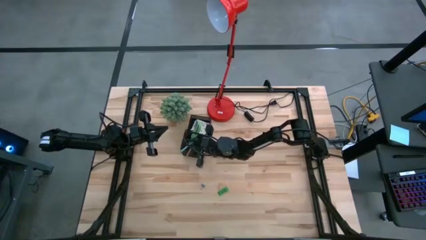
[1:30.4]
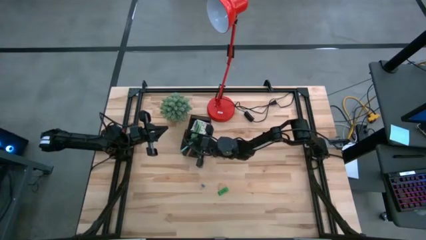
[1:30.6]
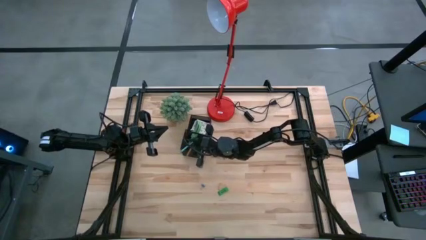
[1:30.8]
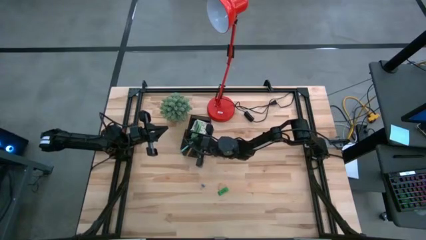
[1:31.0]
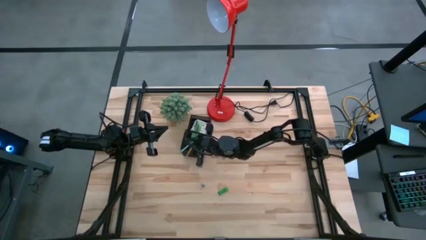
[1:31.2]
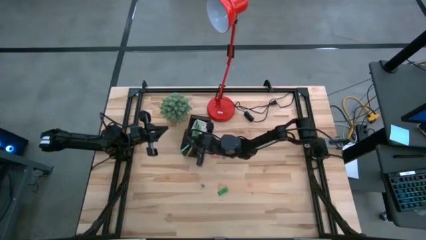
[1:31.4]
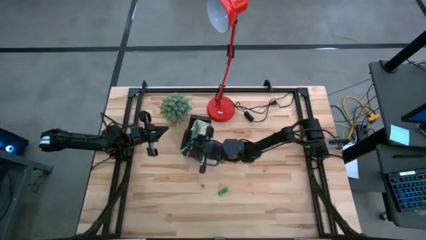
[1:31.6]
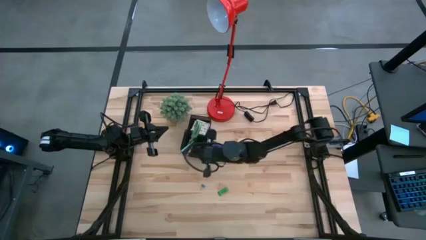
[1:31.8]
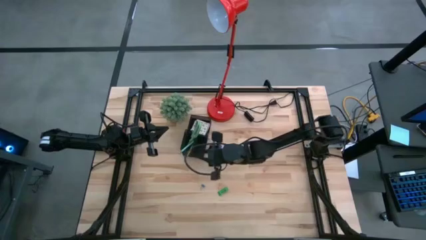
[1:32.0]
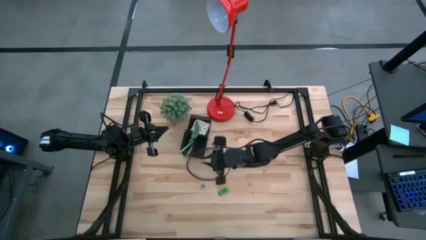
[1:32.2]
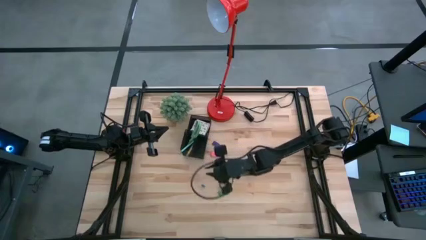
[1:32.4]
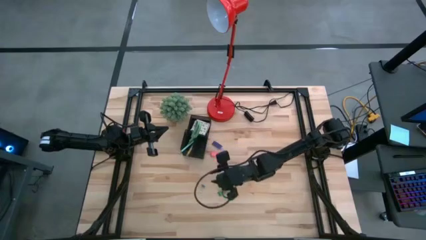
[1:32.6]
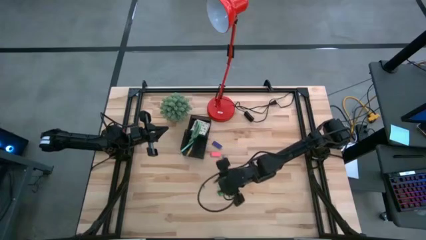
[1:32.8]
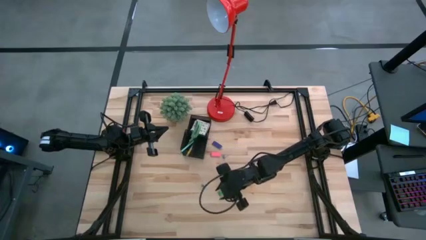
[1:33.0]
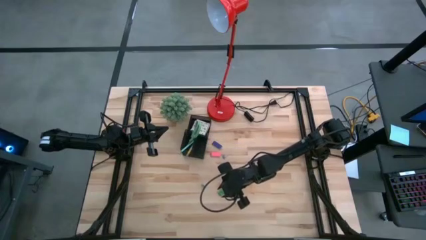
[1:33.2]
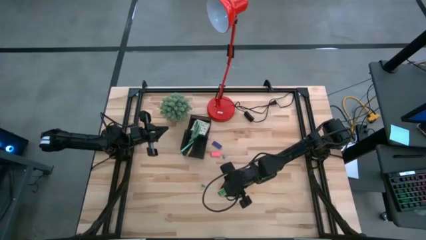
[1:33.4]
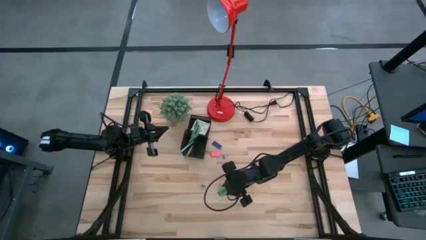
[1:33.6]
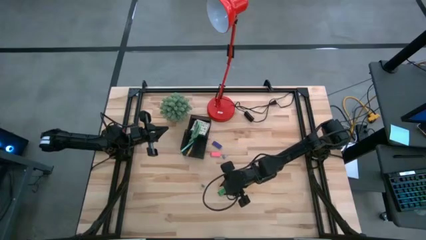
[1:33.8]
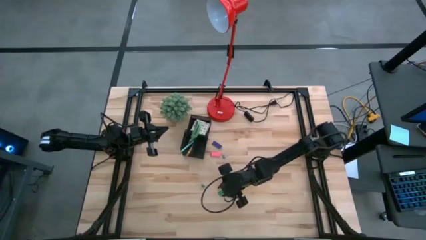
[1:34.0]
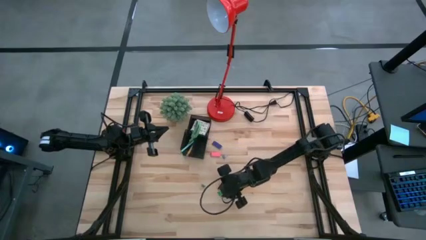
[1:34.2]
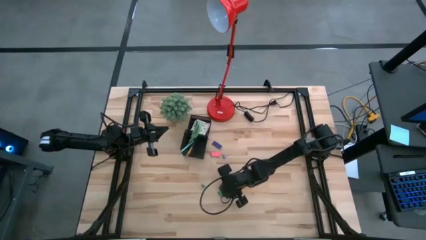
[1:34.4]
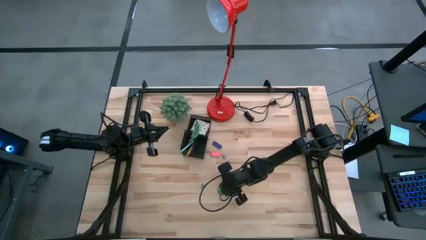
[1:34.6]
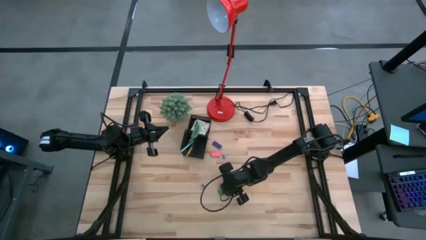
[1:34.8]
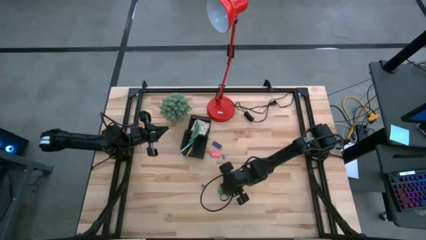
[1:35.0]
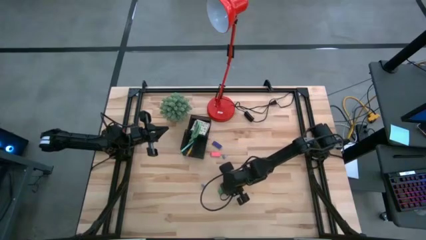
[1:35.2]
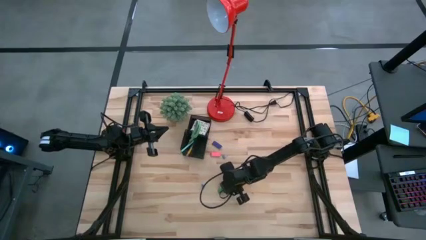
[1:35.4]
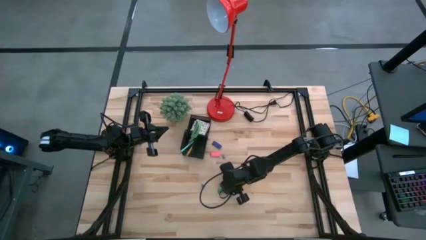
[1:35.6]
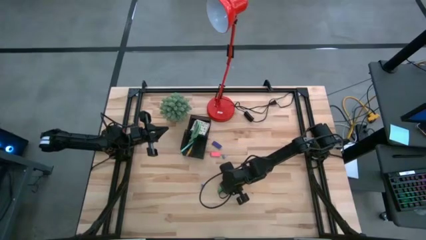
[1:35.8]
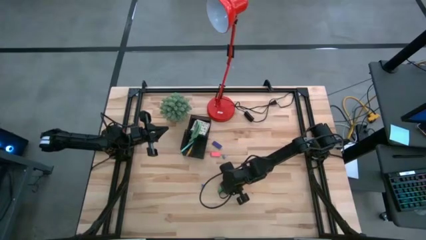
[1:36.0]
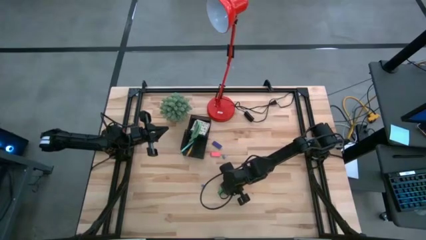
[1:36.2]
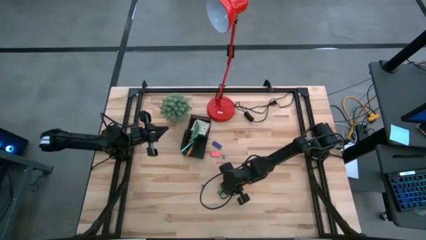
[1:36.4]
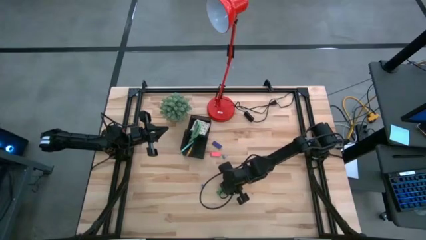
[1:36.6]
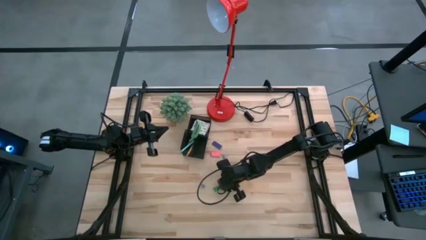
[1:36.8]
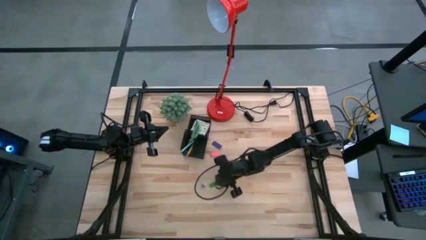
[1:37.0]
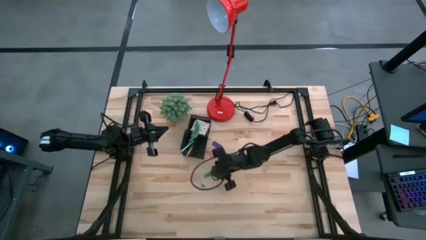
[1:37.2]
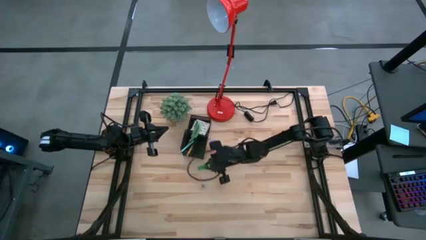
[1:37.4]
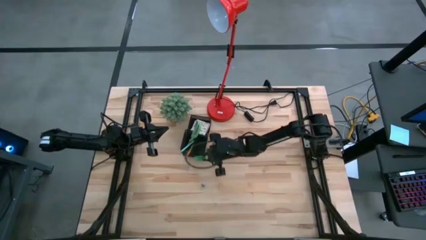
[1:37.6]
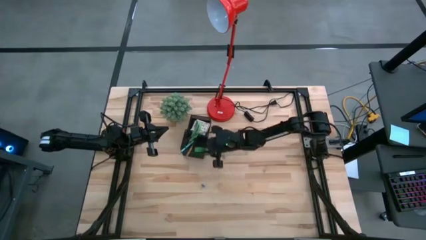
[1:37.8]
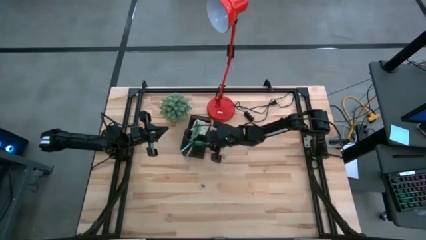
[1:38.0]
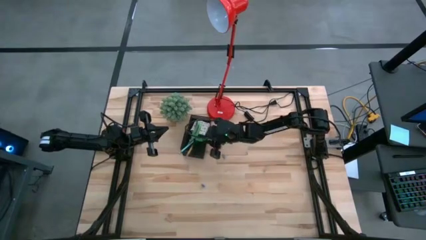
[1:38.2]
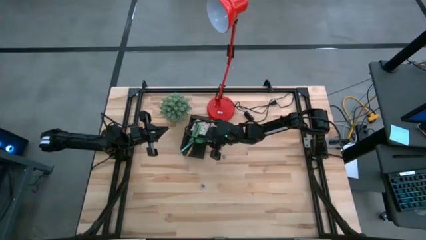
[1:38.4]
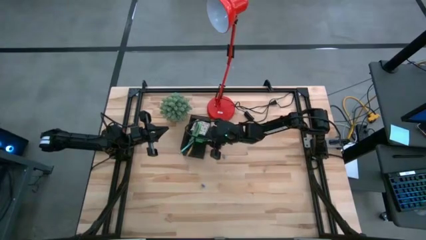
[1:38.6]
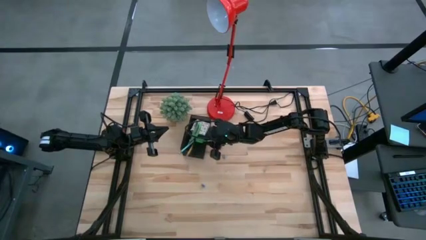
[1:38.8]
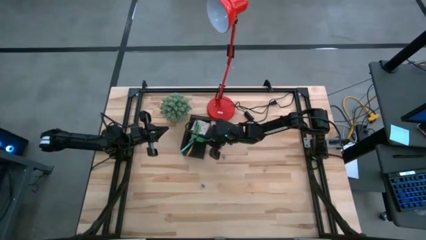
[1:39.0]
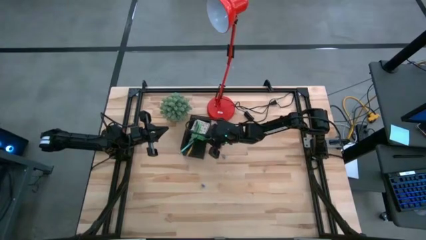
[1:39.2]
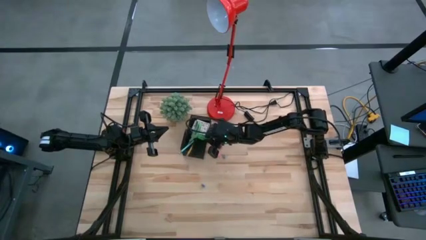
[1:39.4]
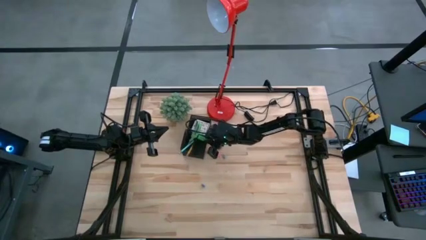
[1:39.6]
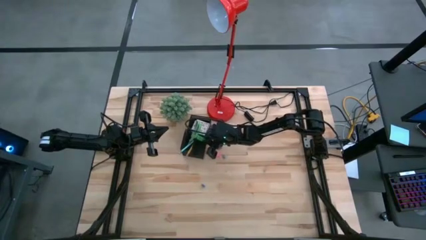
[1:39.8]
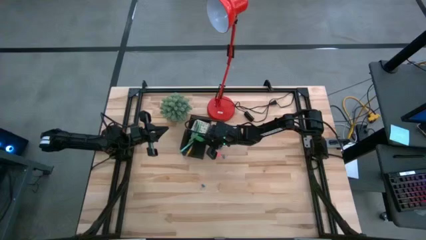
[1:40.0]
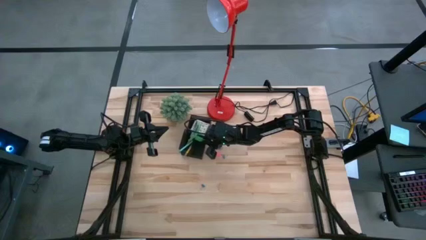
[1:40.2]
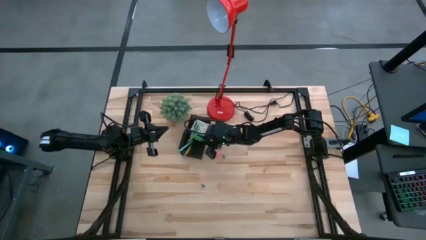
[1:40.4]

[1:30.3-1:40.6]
Task: Pick and place office supplies into organizer
Put the green eraser in the black desk organizer

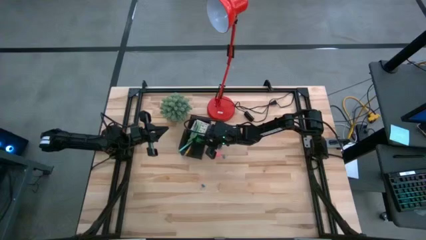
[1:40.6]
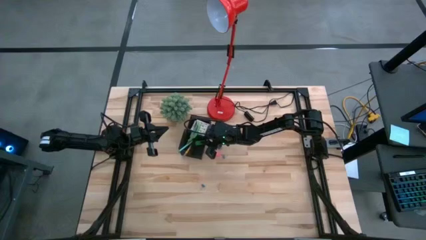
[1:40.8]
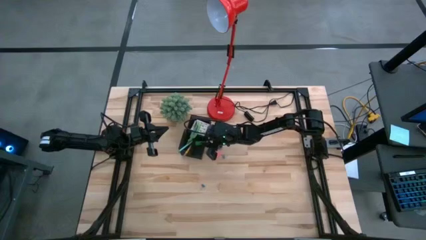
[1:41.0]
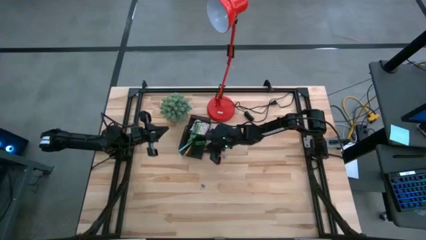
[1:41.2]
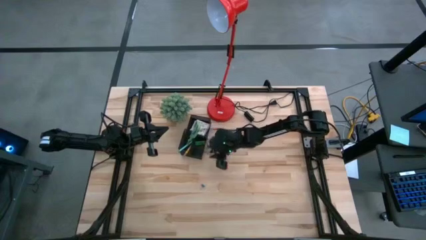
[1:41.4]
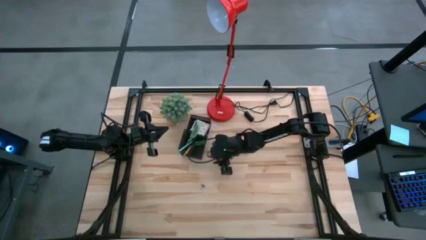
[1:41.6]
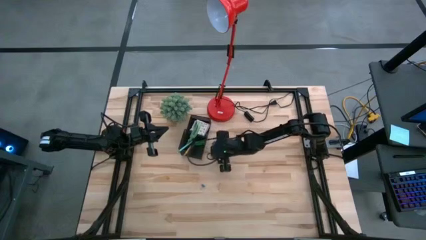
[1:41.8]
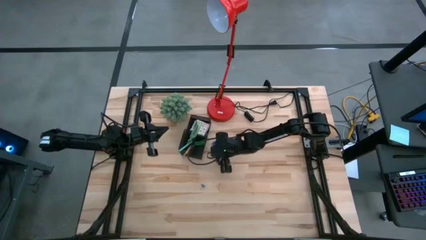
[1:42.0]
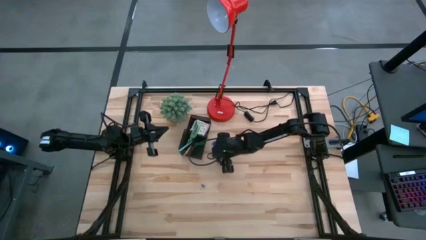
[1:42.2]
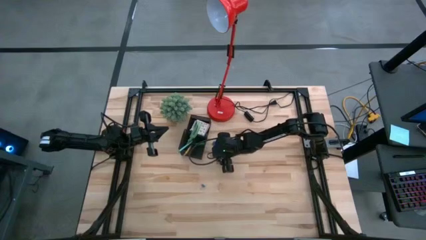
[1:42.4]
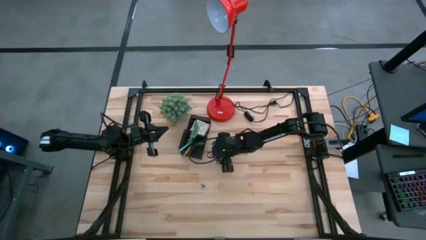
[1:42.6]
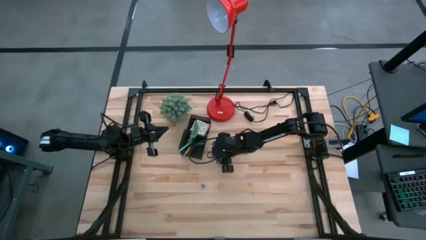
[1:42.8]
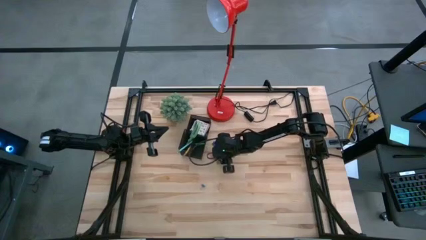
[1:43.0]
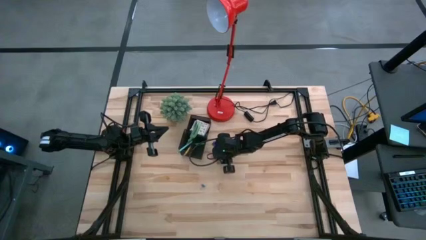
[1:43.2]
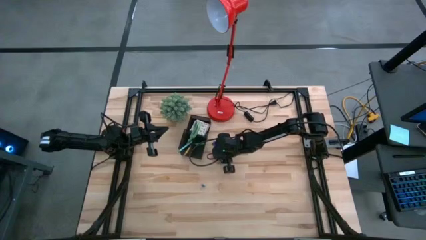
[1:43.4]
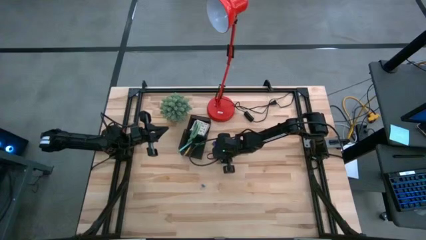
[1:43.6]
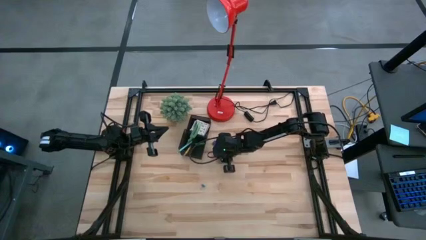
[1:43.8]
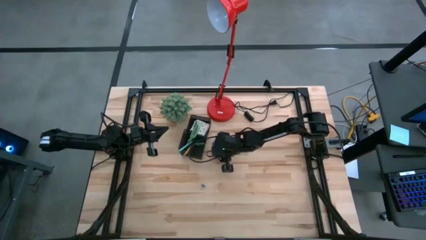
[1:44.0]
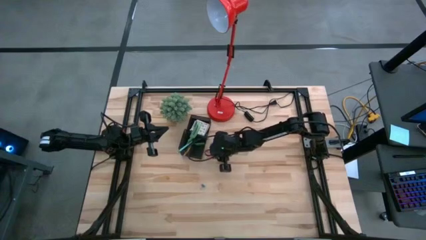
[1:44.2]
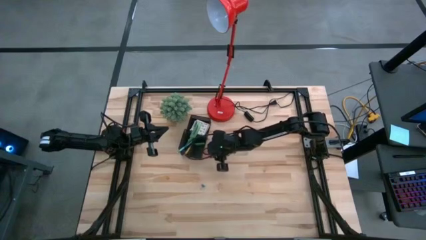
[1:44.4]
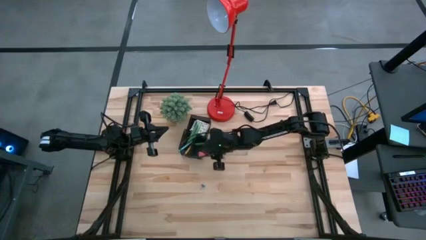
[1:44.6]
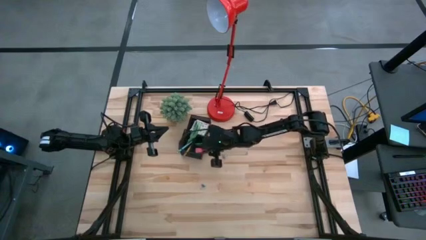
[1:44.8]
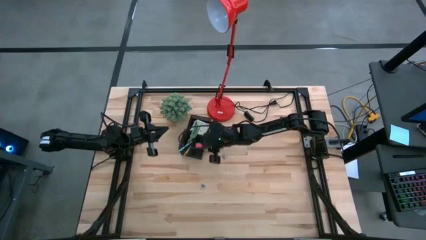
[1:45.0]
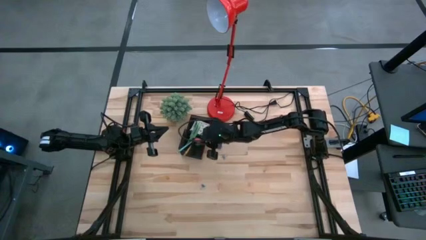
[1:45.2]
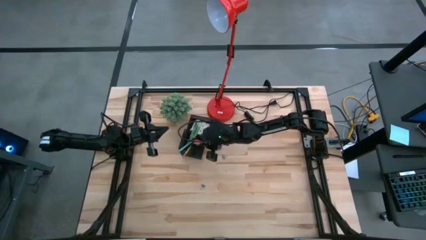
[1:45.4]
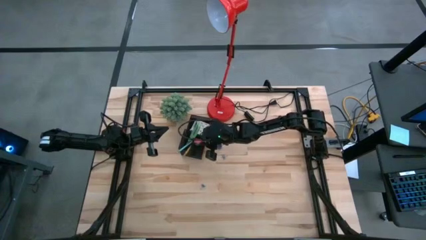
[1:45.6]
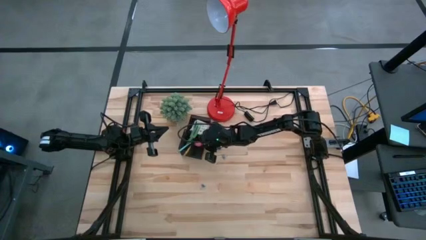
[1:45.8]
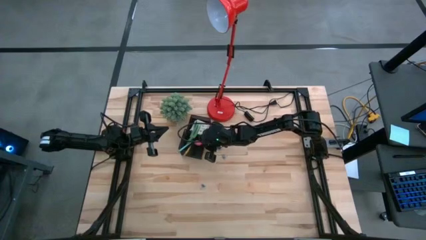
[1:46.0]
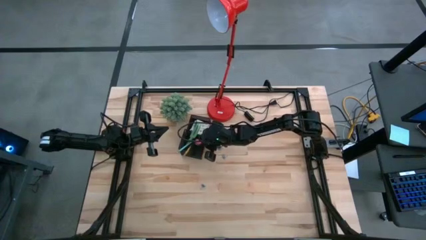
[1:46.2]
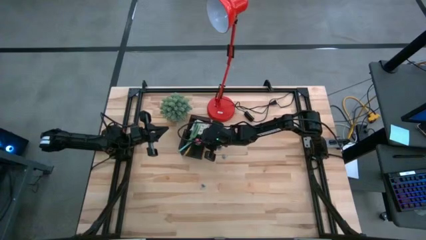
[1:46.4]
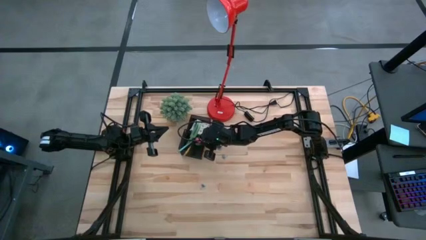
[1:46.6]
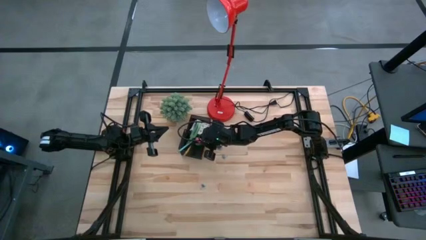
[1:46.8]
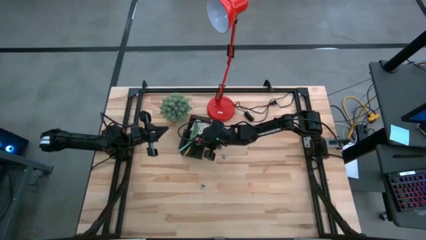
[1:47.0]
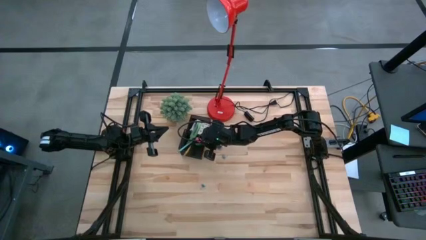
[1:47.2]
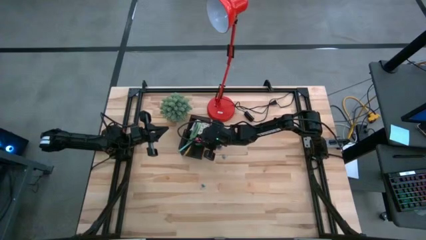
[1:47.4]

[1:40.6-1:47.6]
Put the pink eraser in the black desk organizer
